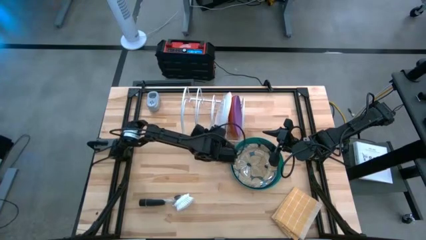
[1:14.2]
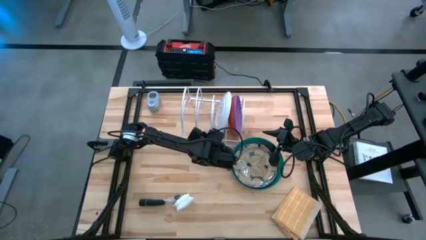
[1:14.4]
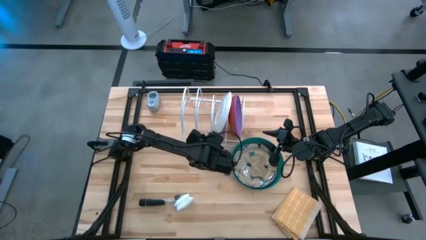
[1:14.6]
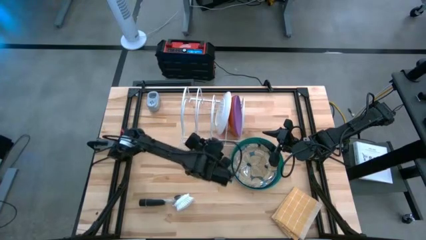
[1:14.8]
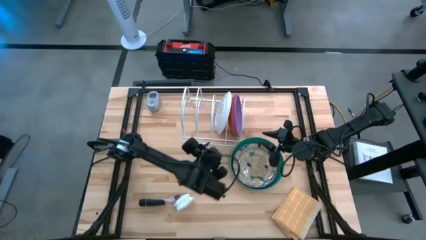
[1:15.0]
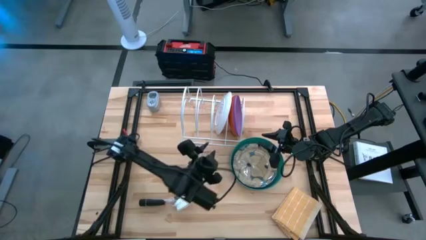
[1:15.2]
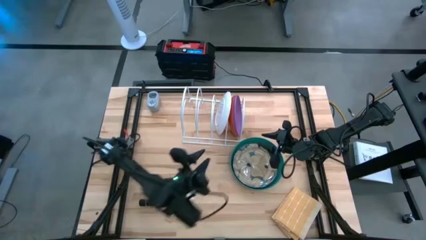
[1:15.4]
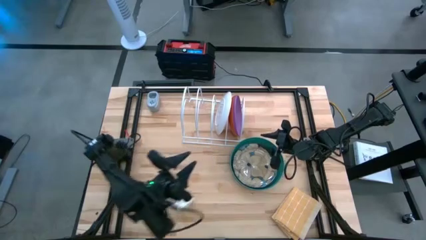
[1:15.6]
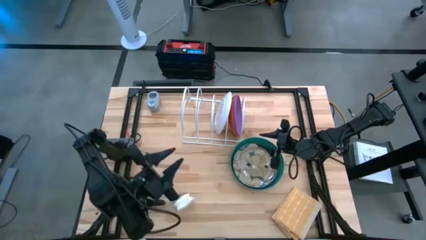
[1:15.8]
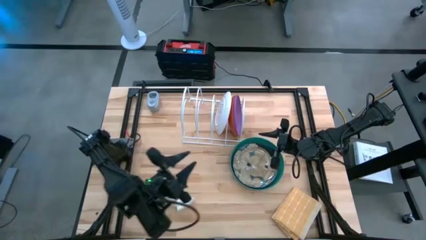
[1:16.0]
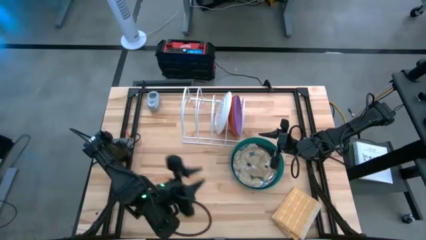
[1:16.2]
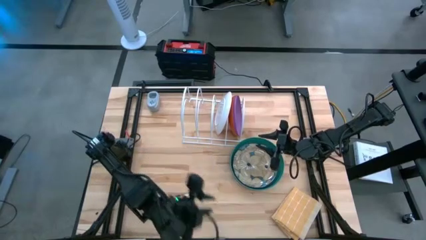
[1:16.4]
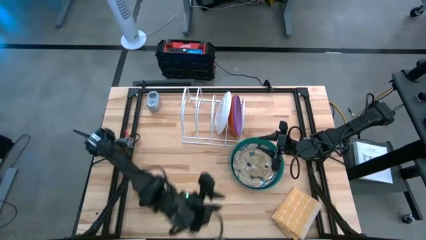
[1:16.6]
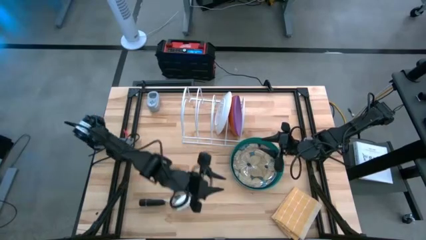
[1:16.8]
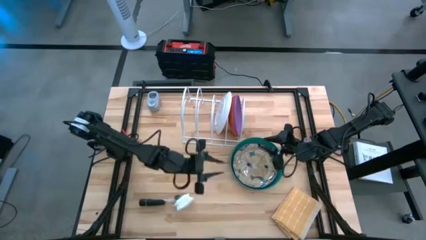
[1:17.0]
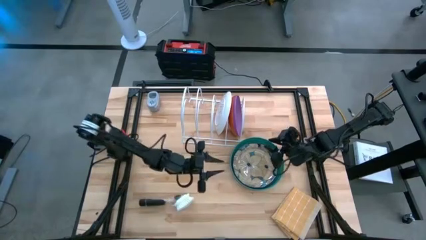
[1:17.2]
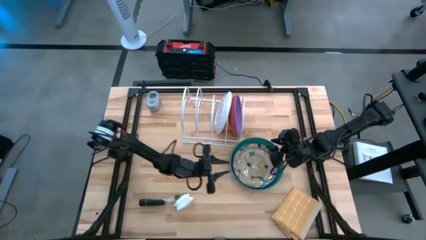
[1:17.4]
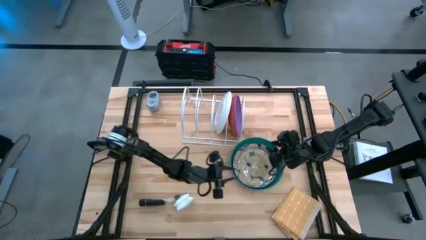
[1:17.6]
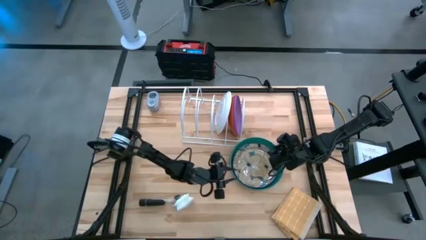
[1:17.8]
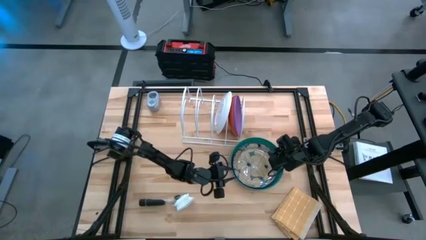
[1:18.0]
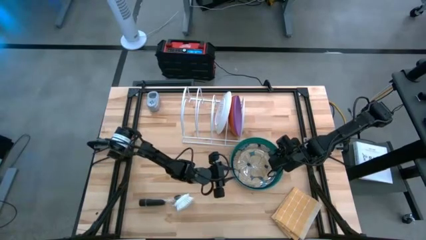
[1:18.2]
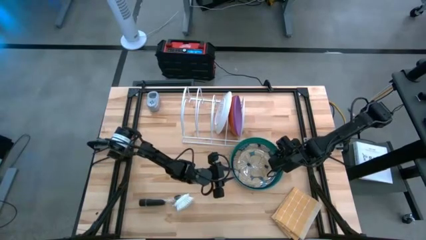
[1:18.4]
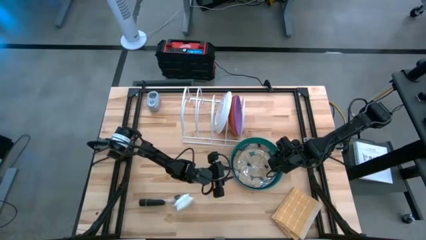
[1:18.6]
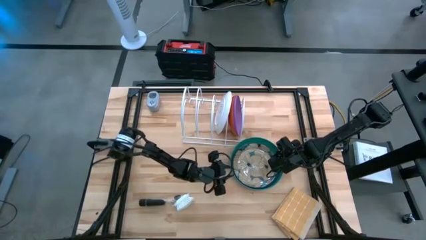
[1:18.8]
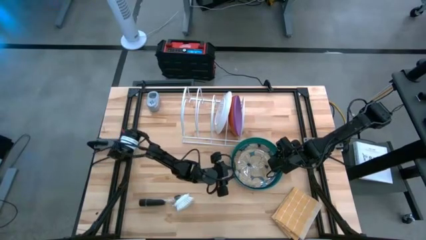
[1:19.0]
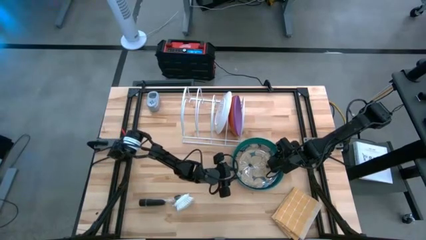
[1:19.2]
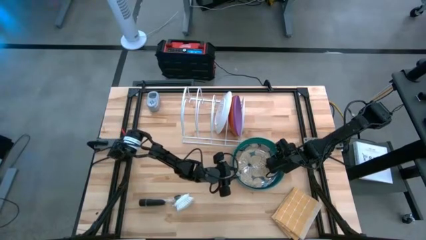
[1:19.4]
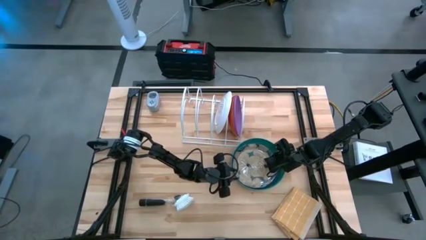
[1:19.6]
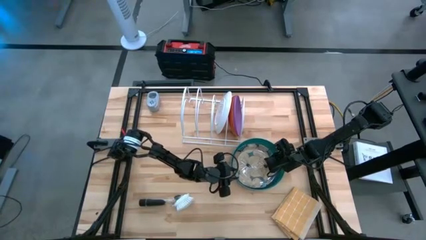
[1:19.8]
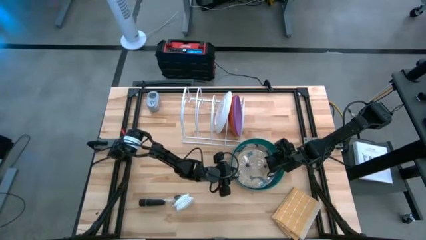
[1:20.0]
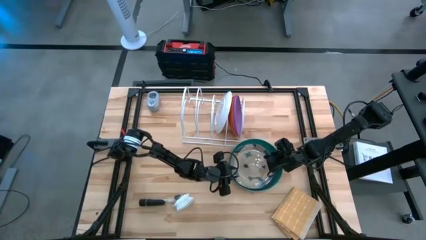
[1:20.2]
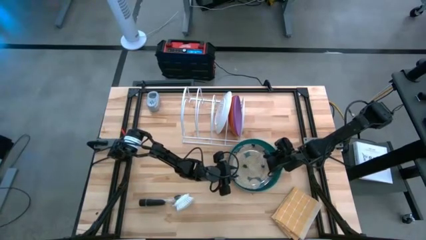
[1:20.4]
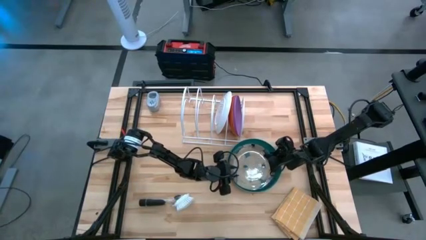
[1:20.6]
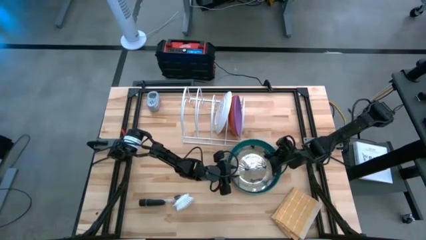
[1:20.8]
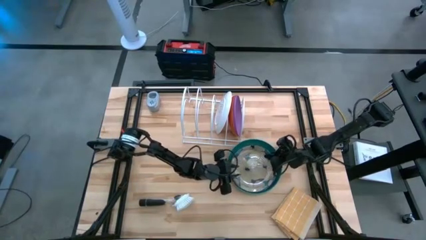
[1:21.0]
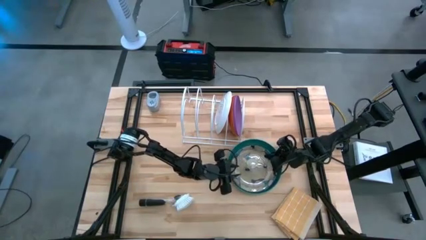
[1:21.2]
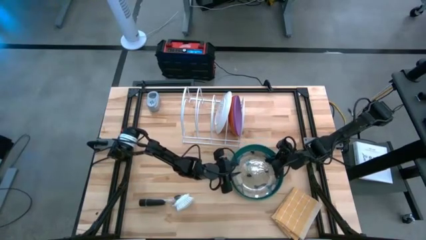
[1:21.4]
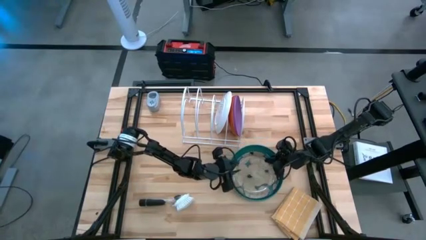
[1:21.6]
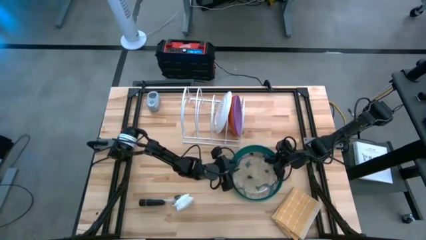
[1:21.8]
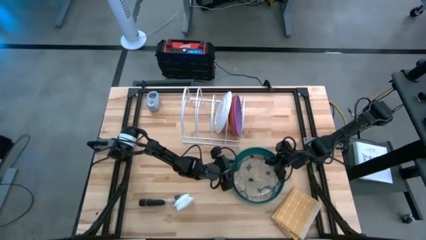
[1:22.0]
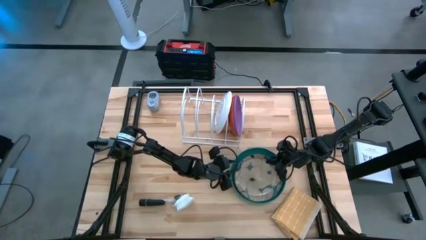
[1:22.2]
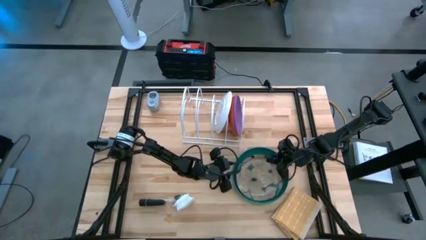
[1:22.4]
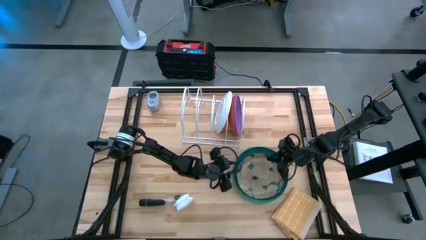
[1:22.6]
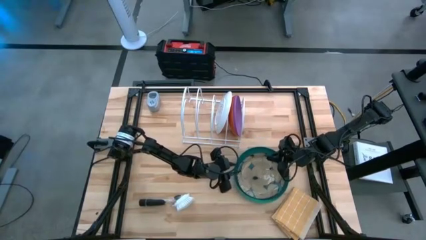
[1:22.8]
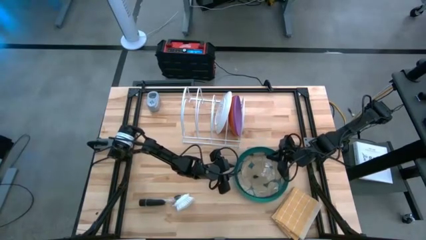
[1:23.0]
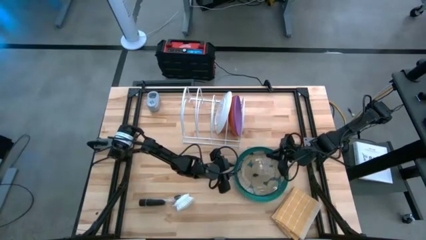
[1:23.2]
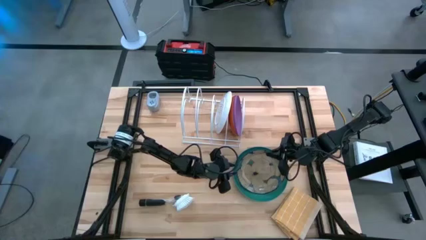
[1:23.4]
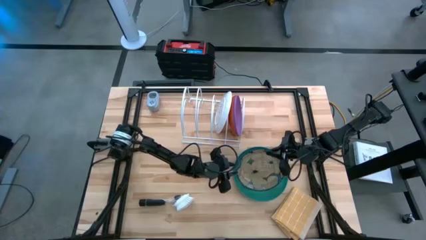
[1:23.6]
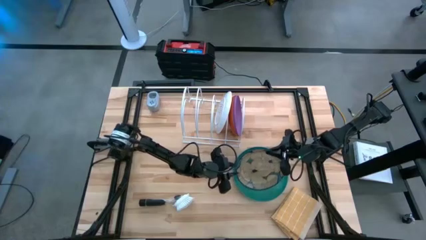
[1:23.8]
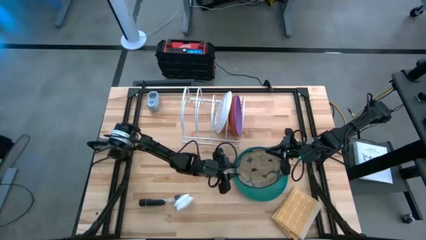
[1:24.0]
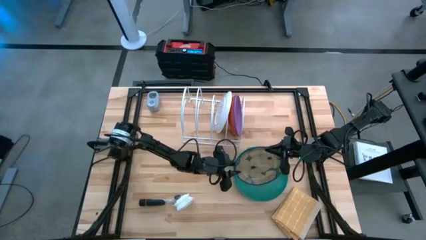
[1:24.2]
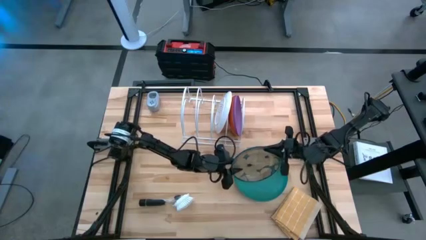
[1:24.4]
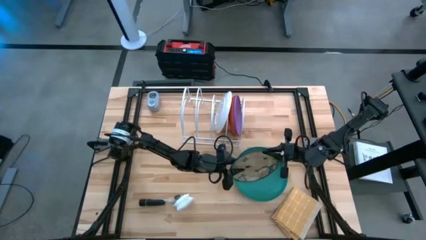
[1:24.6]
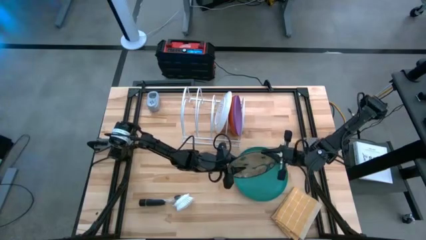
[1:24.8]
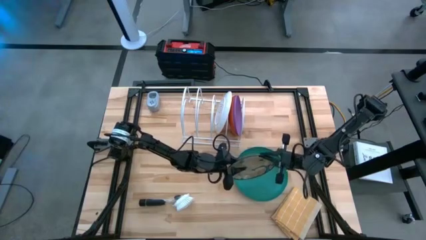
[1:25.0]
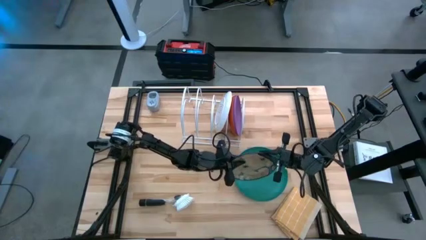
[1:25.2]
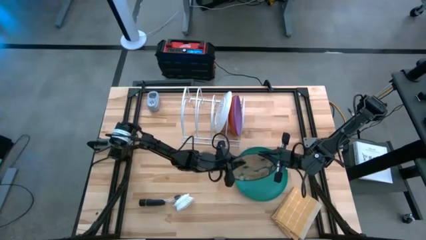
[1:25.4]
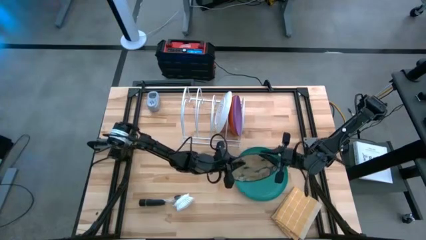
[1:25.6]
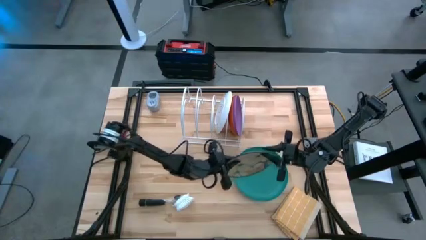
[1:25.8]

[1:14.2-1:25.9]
Task: Sort dishes
Put the blue patterned plate into the dish rack

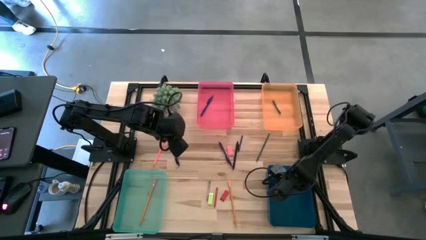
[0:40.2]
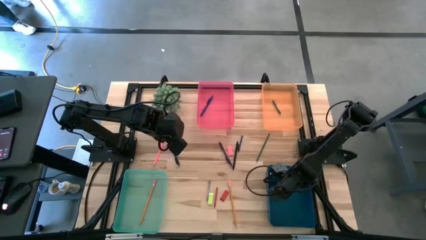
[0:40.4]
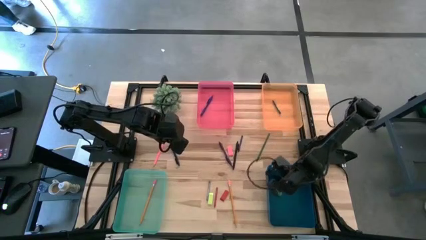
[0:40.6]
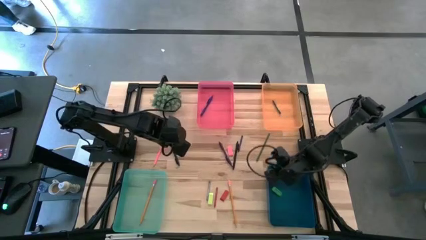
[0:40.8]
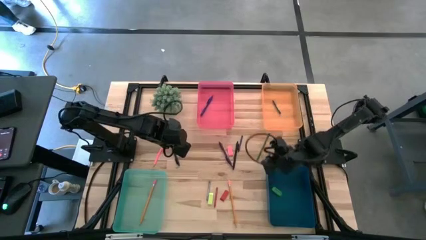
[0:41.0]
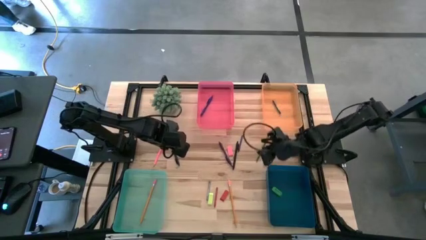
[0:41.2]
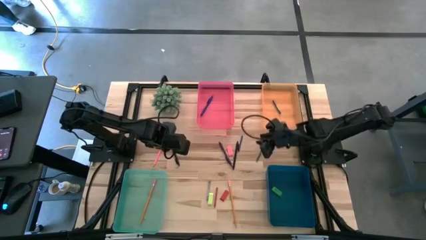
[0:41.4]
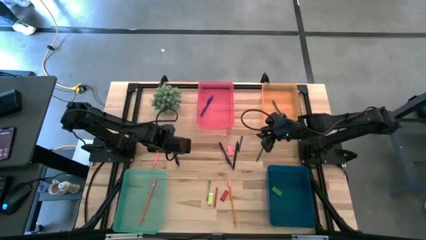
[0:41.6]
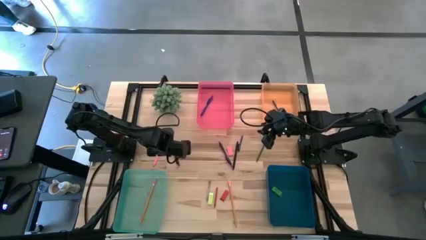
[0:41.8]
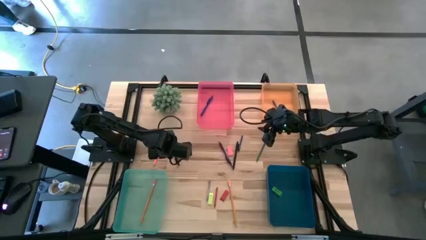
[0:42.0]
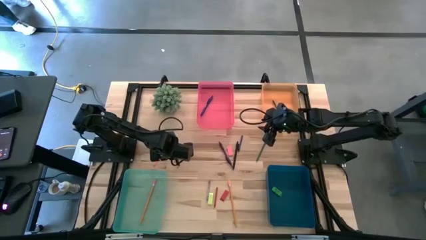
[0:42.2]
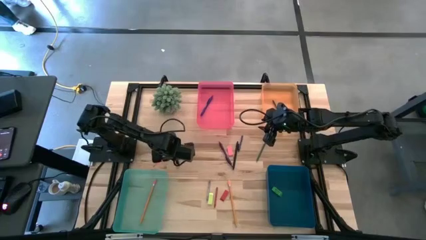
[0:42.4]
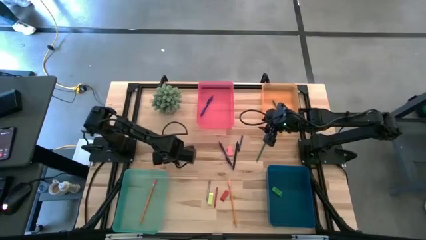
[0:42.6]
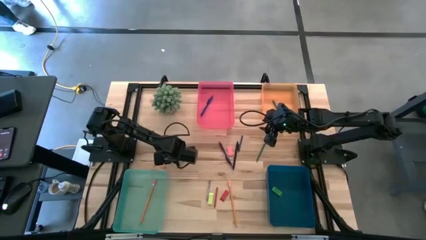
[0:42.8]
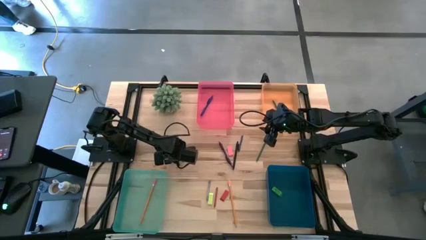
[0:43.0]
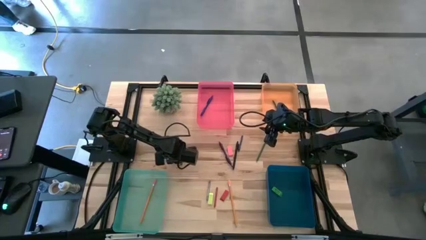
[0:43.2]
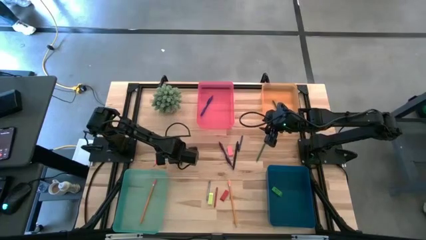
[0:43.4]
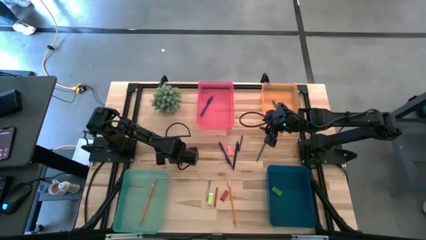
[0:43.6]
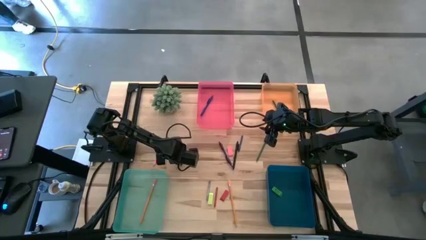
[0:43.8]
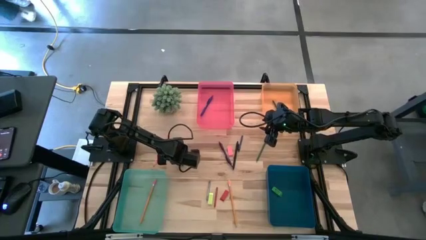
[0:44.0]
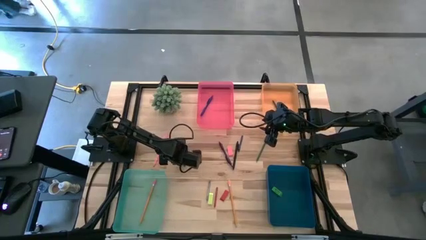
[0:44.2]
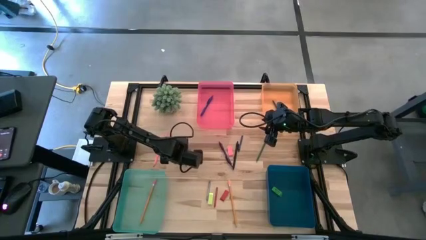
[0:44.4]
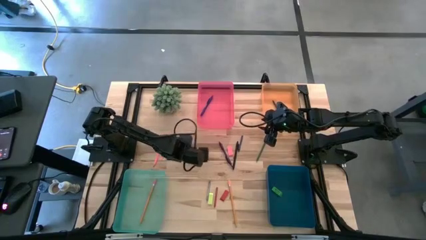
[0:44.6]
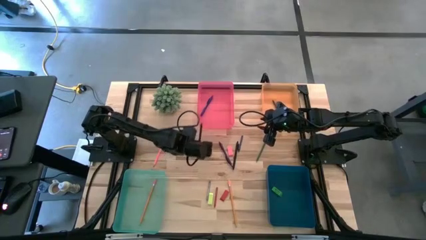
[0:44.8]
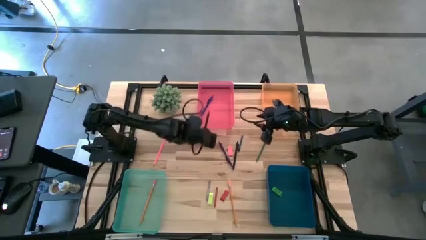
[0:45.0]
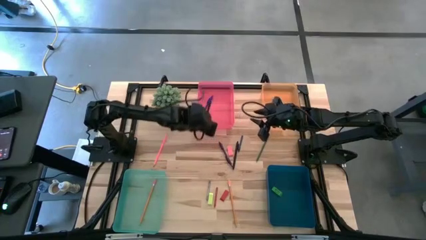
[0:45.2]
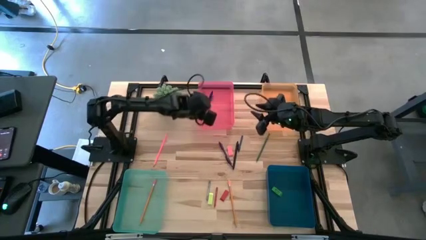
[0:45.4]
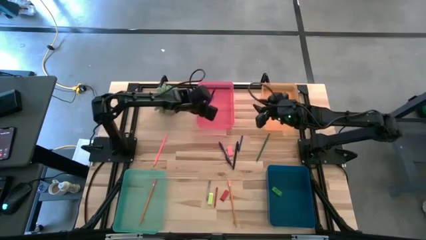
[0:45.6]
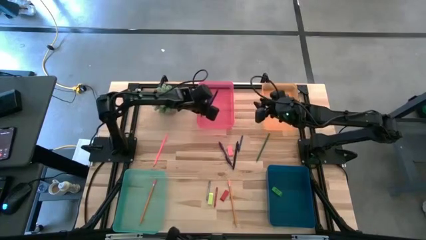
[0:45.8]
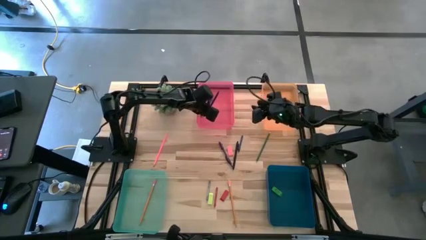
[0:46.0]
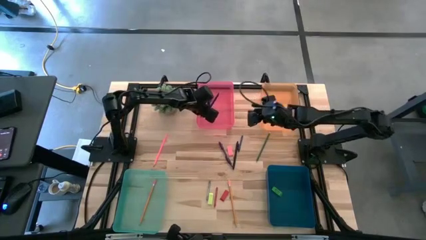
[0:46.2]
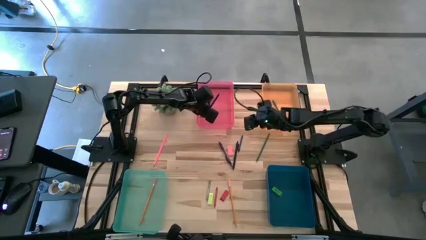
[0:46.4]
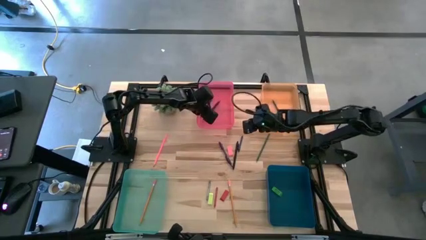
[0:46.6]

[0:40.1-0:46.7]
Task: Sort crayons/erasers/pens/pencils in bins
Put the left black pen into the red bin
